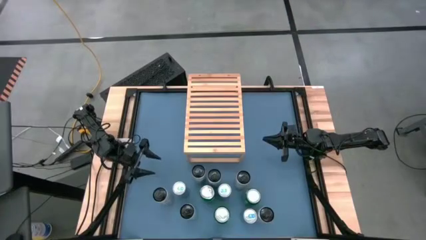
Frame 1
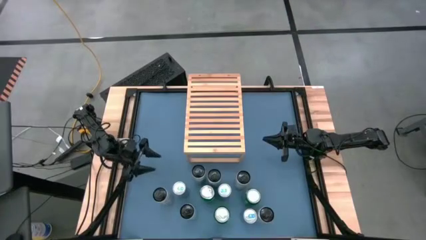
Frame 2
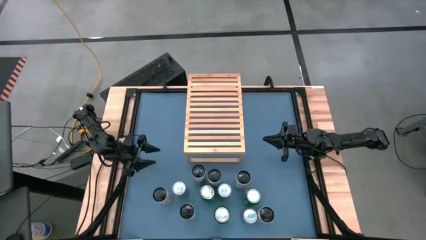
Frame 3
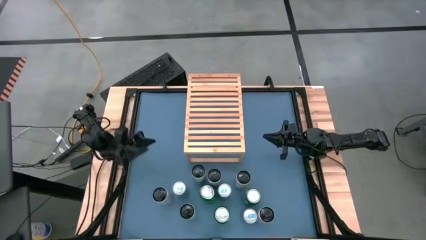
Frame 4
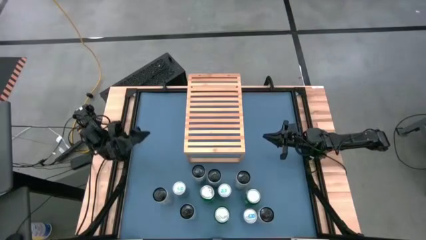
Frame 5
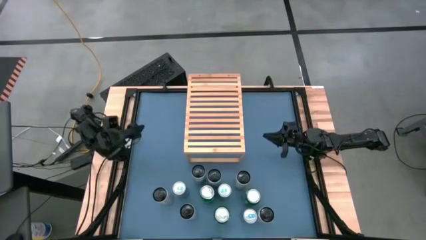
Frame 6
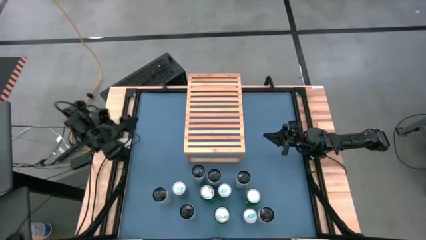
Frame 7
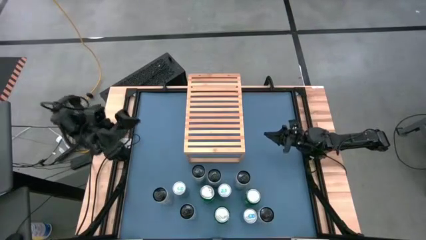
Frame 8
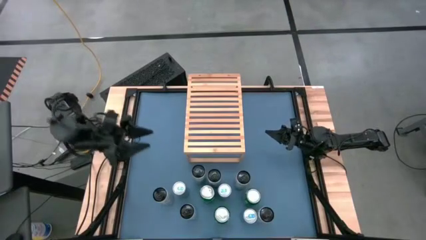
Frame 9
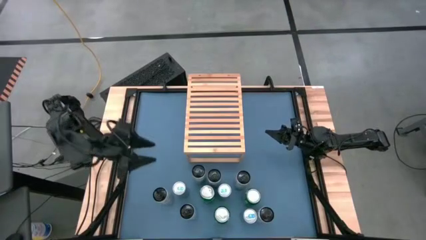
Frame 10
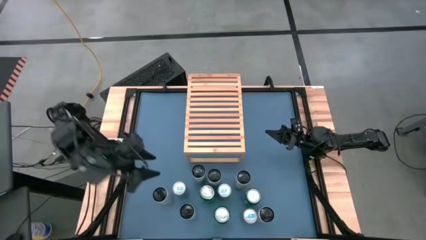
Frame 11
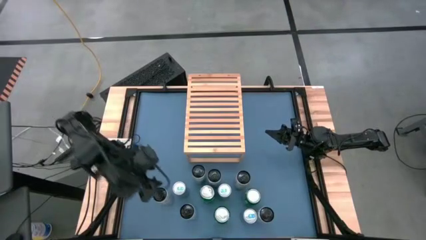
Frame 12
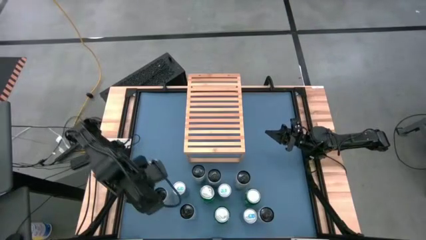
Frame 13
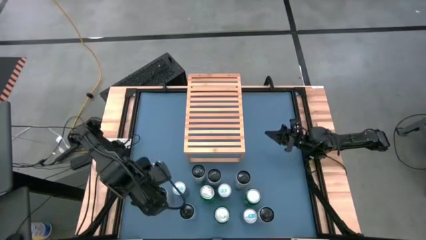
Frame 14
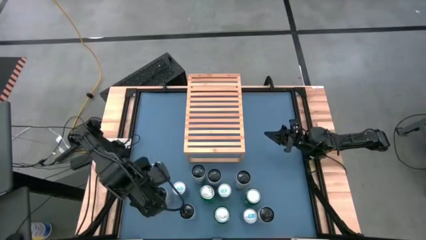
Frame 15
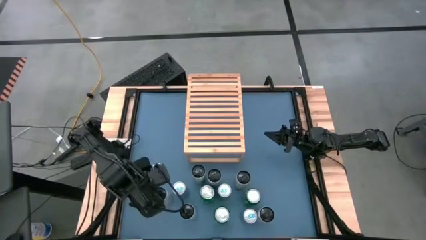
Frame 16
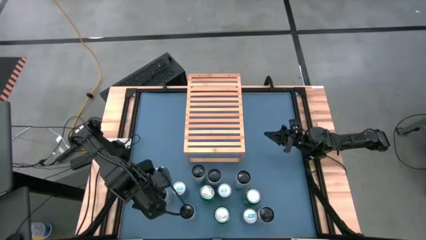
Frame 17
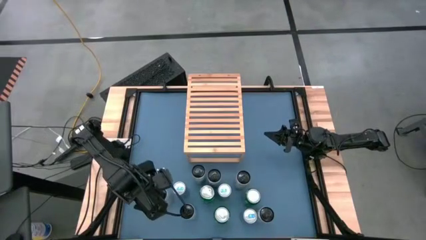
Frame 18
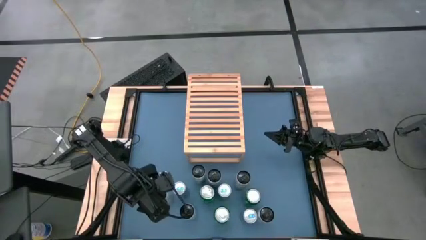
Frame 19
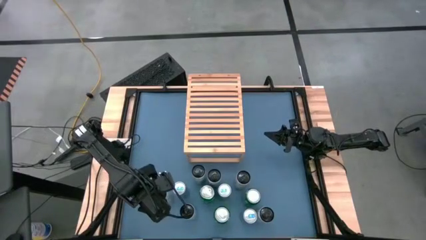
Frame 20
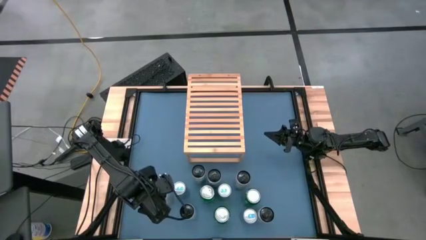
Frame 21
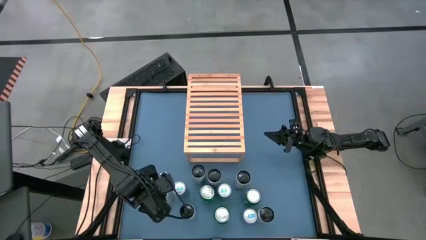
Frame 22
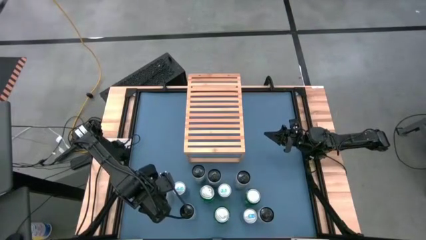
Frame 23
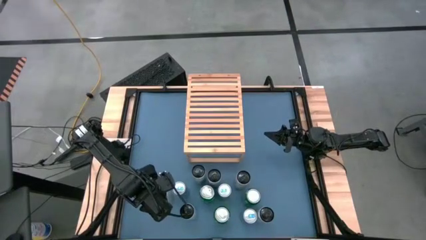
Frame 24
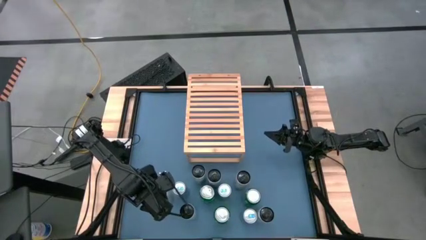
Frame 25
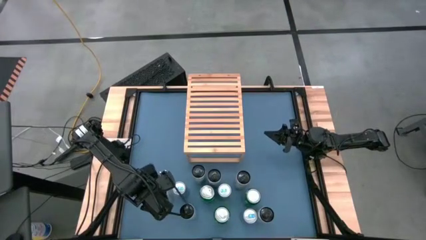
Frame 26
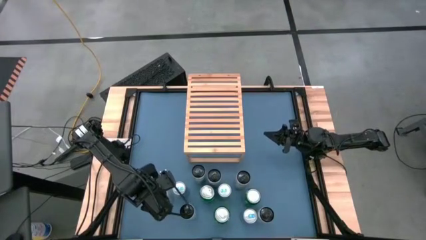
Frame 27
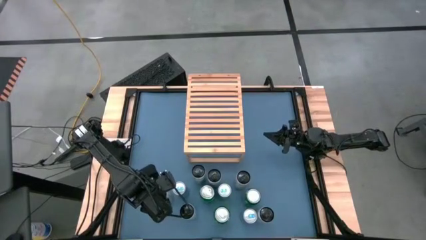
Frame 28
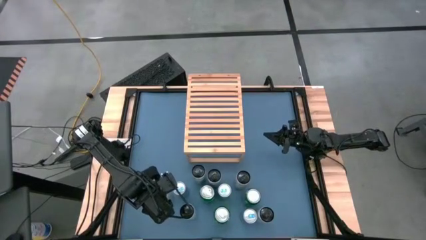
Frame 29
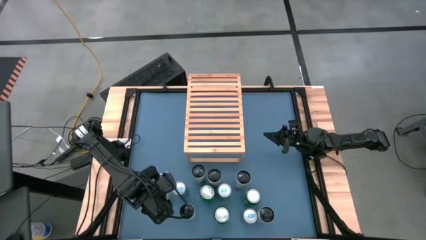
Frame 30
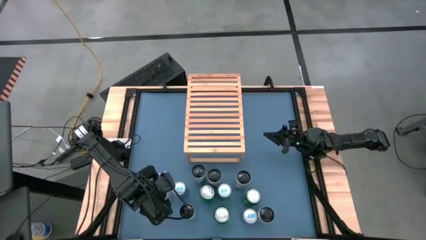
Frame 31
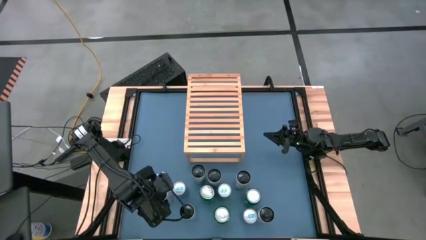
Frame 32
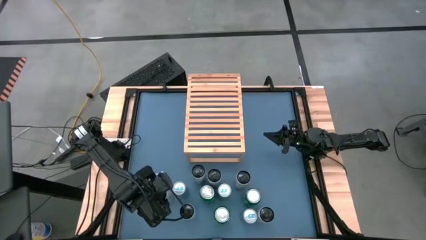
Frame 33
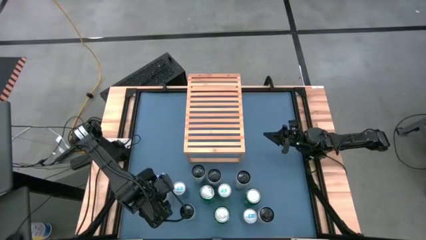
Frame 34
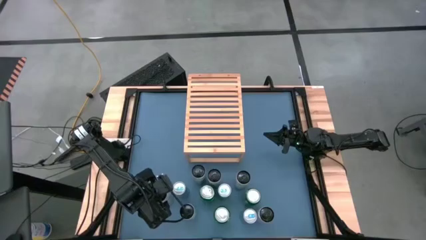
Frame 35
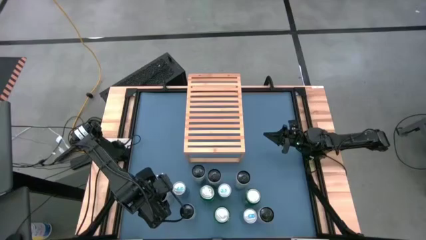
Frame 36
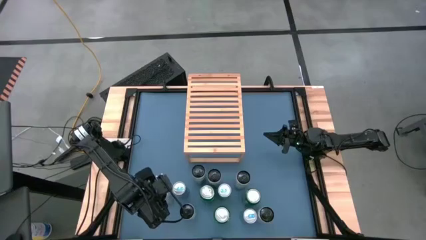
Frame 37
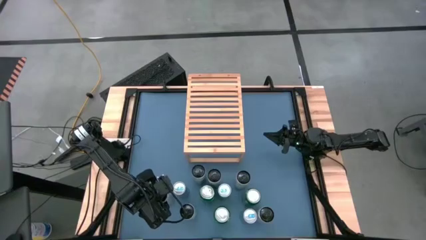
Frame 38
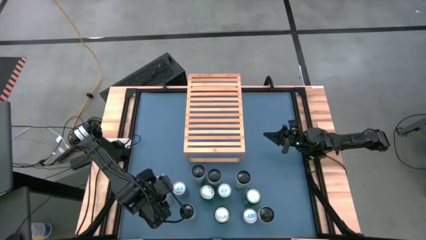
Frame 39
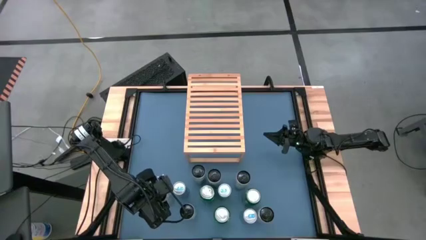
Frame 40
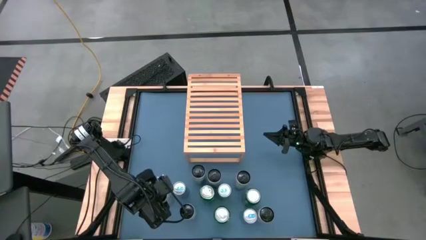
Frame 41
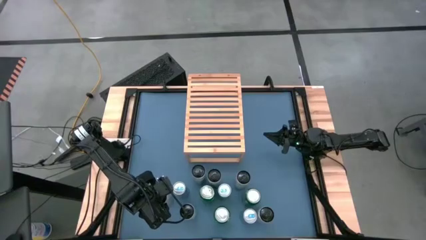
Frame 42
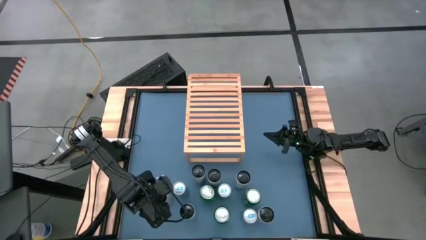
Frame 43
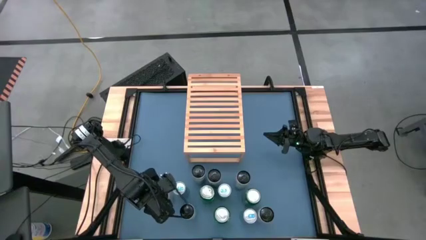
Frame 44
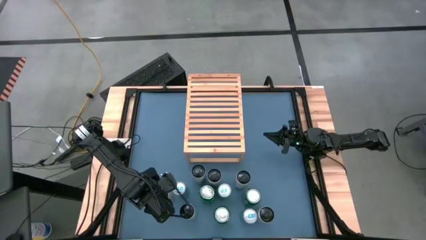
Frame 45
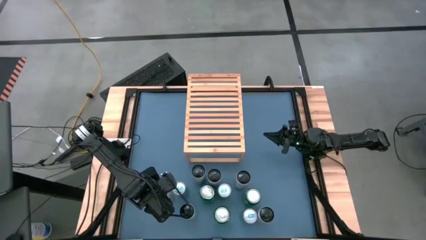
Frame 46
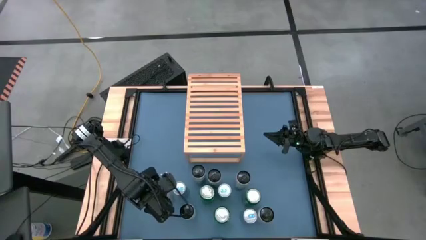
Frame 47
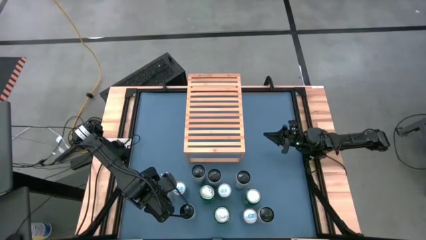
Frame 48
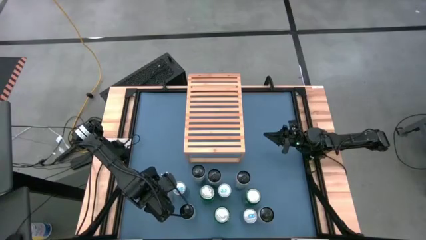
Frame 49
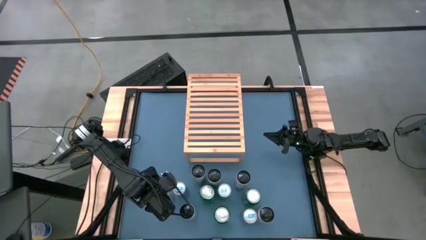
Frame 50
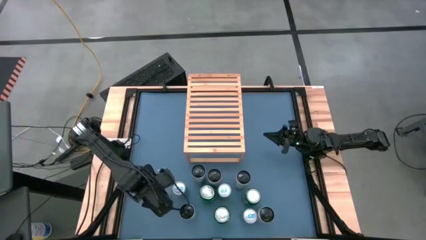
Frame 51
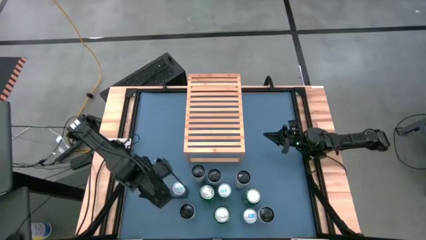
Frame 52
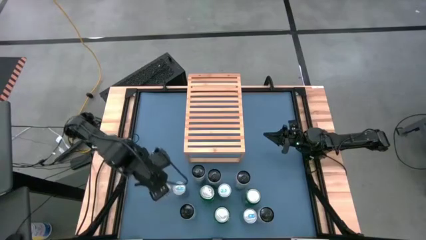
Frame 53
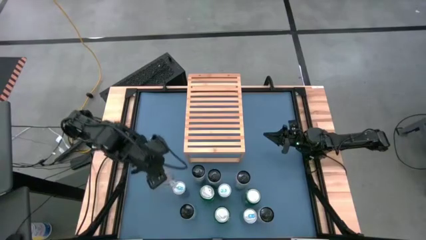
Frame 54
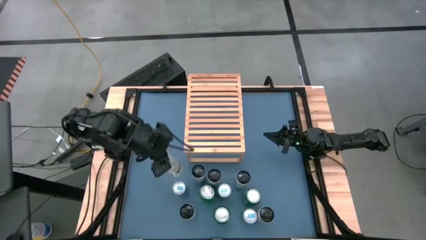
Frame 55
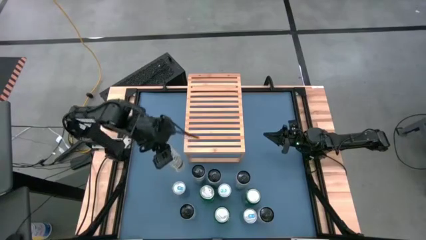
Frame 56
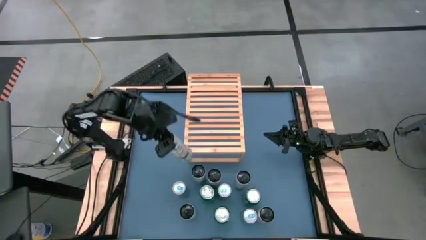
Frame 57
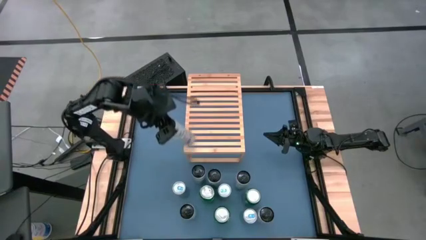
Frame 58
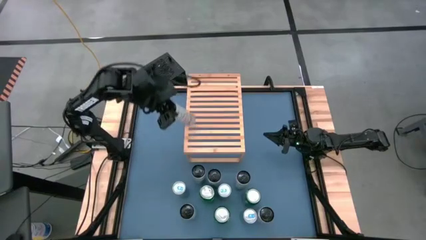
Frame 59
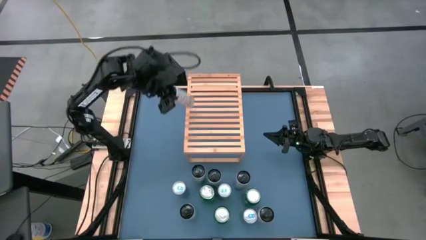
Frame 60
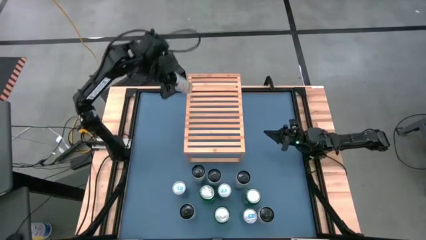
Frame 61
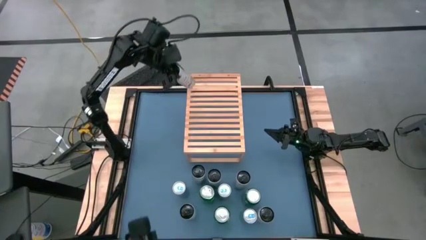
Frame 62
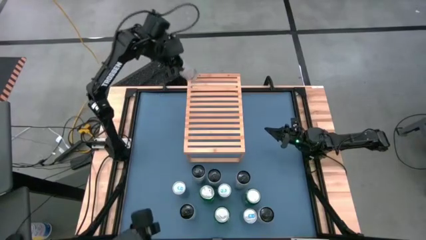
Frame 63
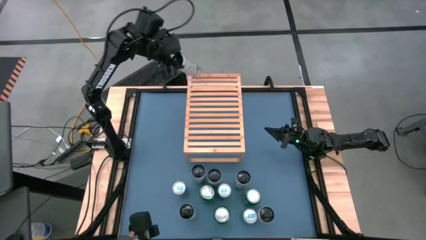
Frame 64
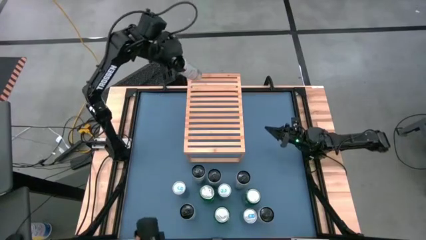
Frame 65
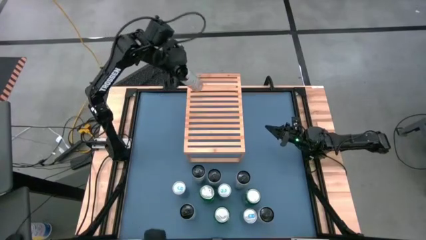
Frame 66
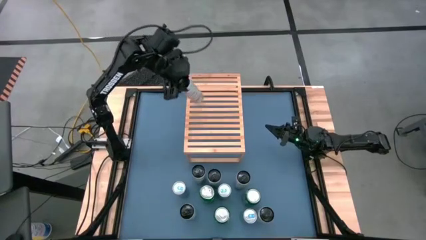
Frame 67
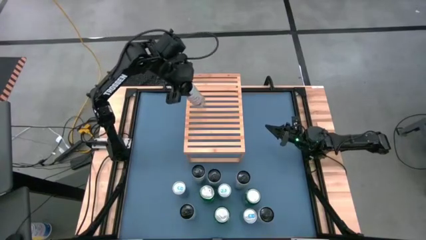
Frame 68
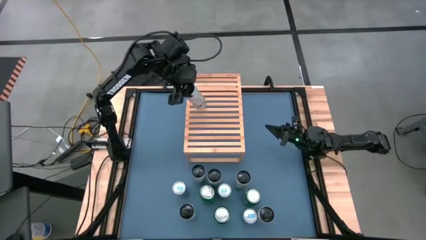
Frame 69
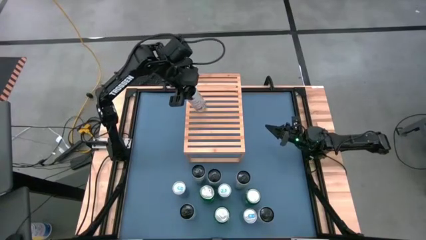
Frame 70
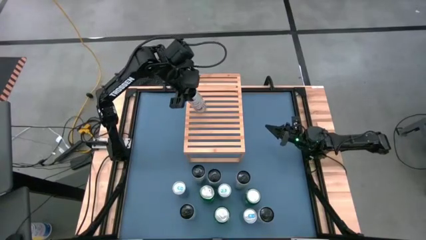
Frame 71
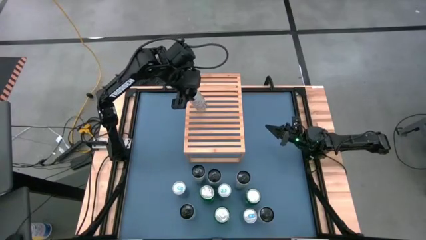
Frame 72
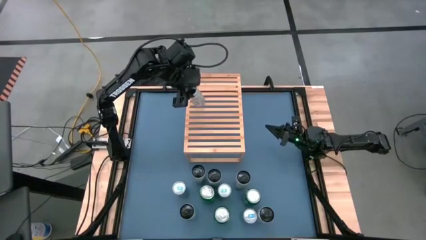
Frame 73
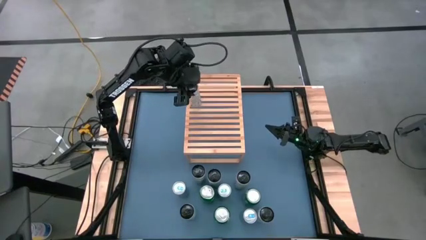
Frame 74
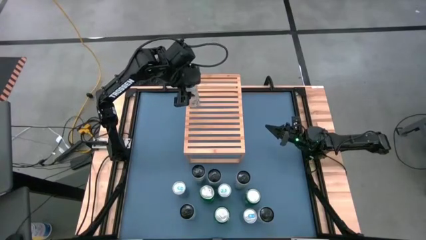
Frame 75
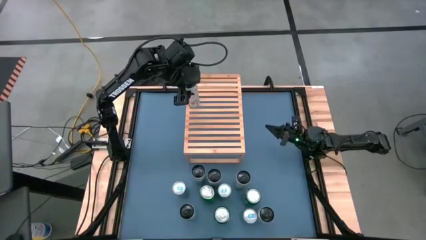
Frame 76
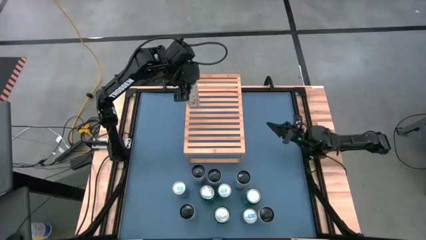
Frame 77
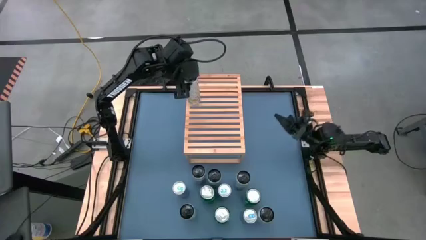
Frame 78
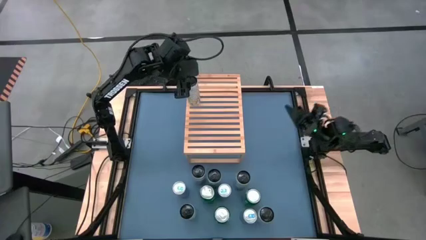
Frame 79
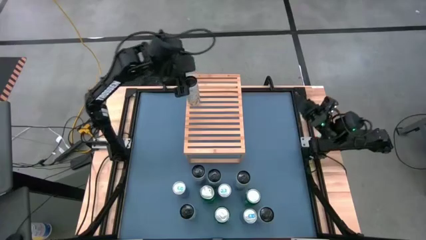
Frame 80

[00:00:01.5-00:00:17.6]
Task: Place canned beverage on shelf
Put the white yellow soda can on the shelf
